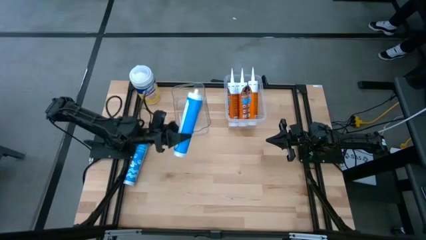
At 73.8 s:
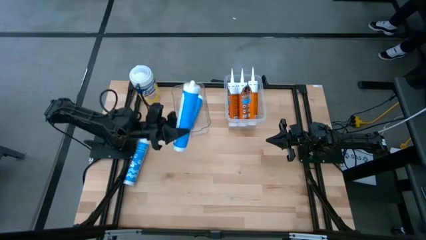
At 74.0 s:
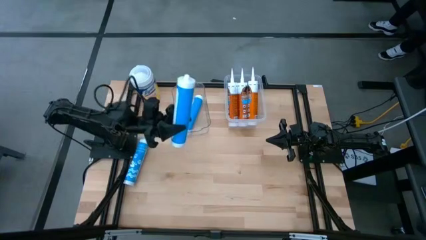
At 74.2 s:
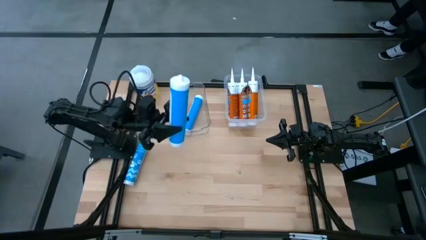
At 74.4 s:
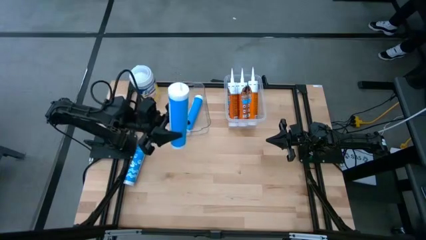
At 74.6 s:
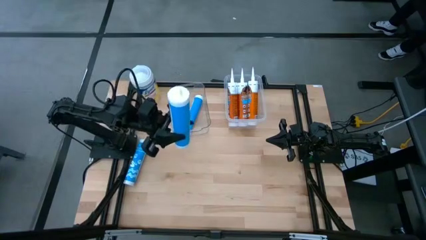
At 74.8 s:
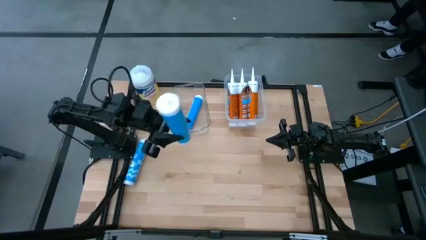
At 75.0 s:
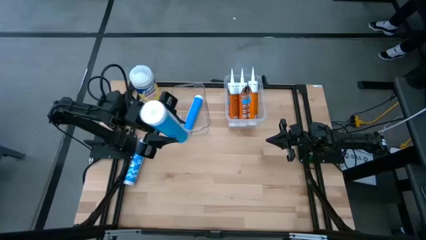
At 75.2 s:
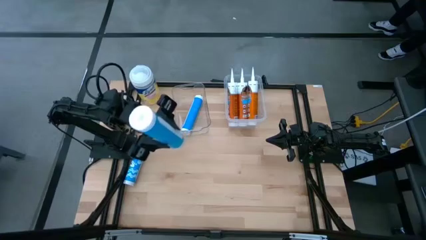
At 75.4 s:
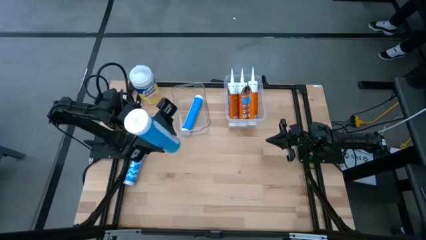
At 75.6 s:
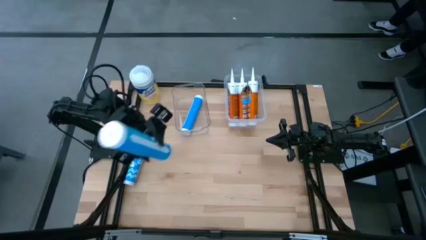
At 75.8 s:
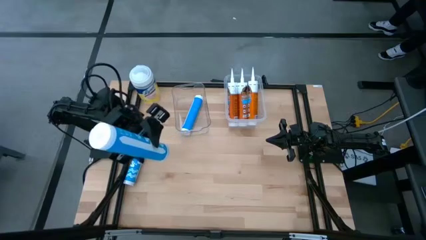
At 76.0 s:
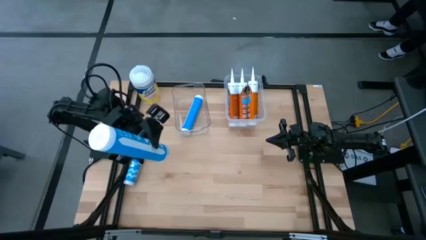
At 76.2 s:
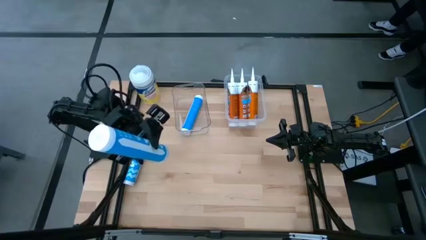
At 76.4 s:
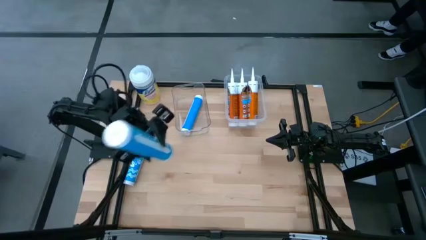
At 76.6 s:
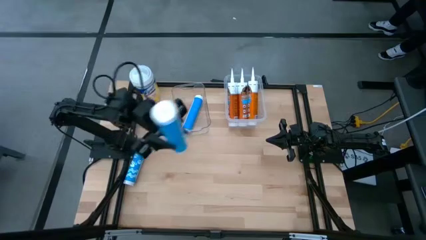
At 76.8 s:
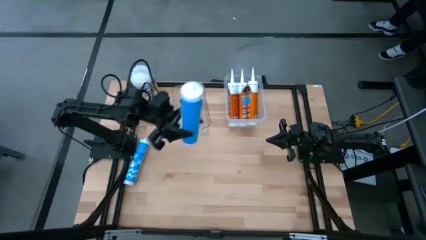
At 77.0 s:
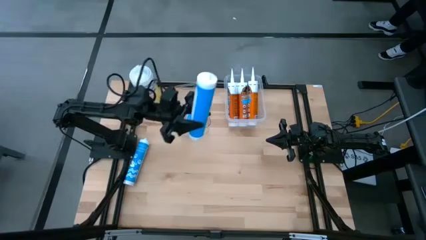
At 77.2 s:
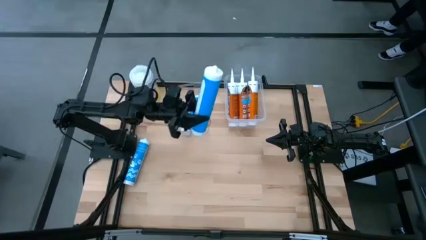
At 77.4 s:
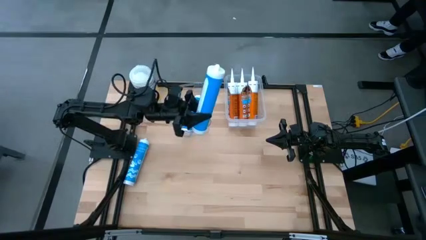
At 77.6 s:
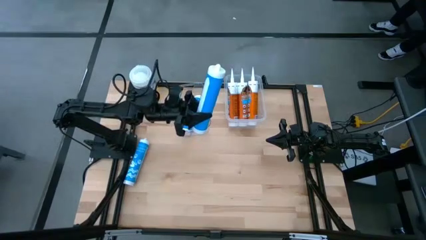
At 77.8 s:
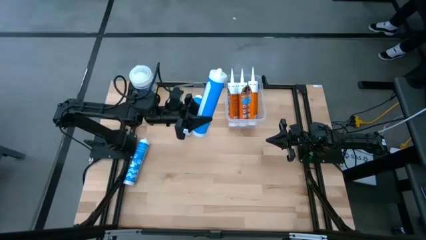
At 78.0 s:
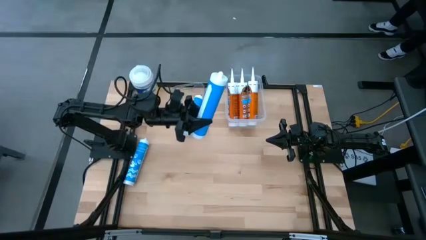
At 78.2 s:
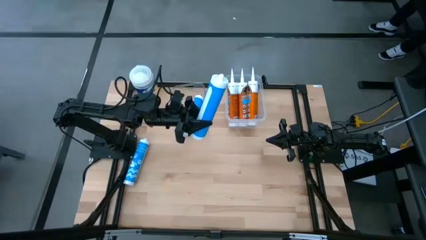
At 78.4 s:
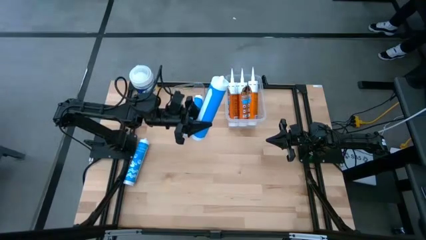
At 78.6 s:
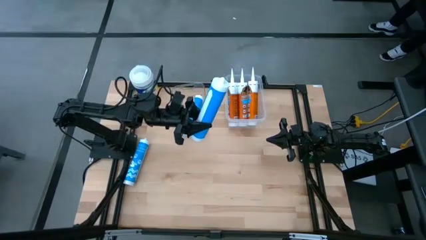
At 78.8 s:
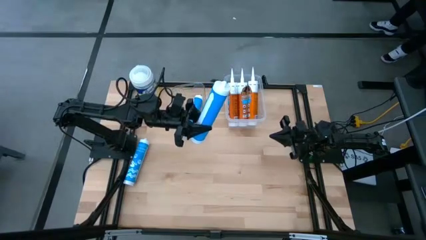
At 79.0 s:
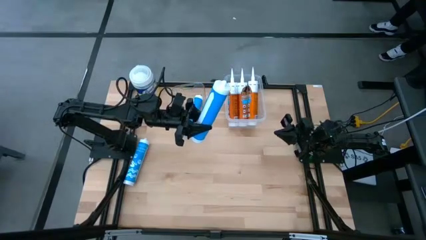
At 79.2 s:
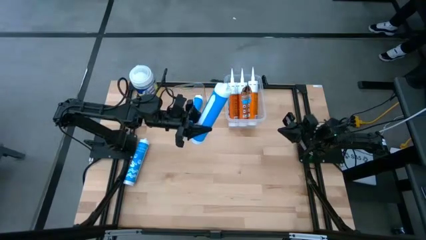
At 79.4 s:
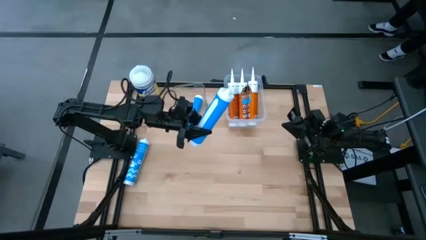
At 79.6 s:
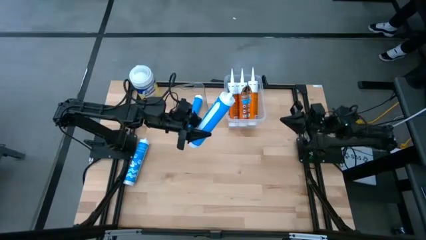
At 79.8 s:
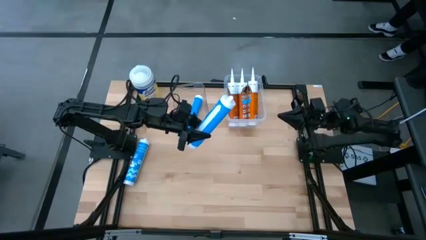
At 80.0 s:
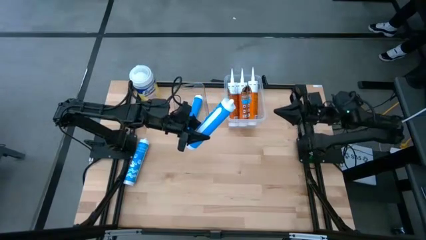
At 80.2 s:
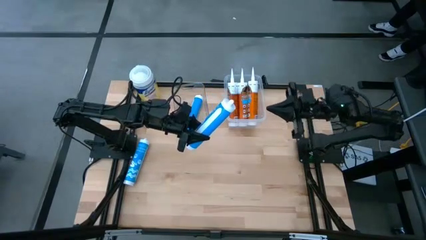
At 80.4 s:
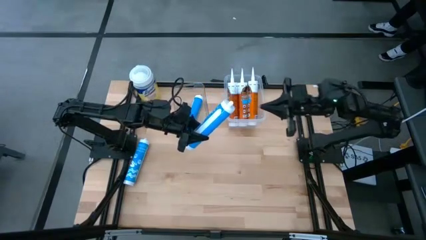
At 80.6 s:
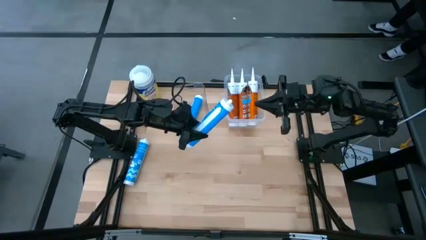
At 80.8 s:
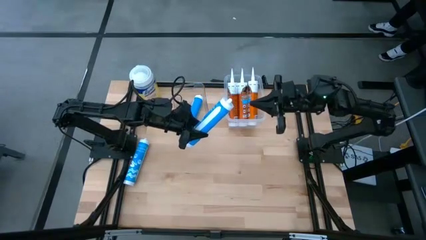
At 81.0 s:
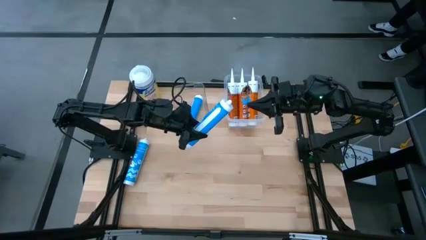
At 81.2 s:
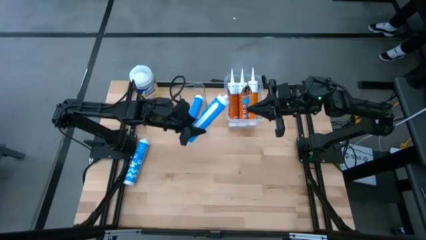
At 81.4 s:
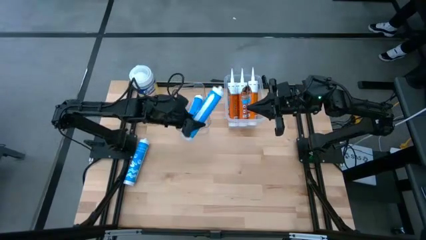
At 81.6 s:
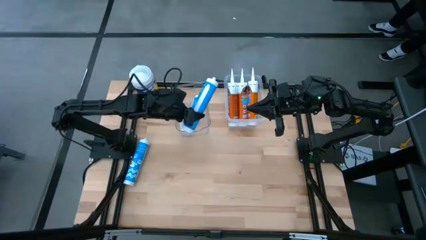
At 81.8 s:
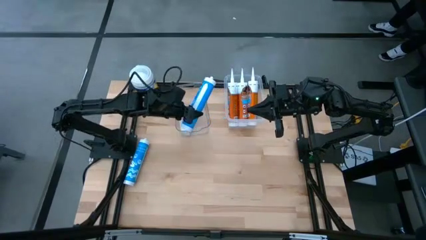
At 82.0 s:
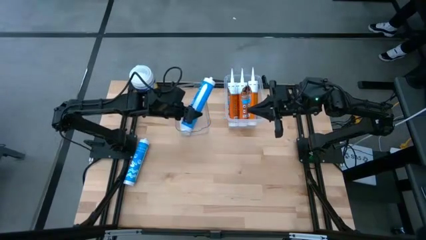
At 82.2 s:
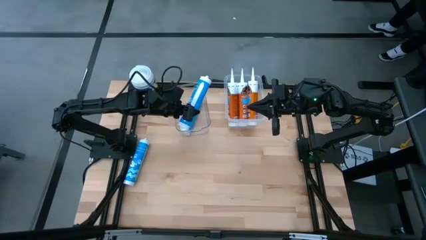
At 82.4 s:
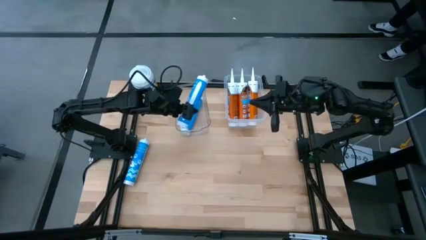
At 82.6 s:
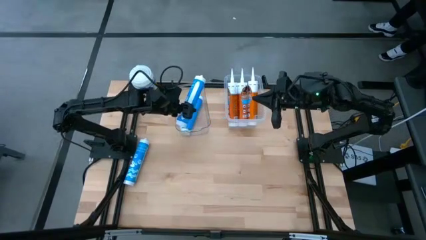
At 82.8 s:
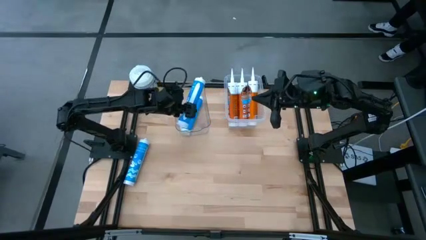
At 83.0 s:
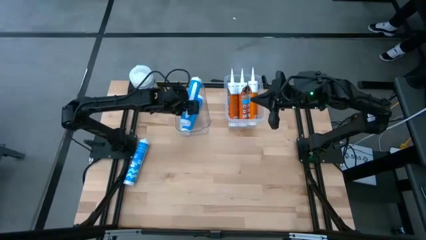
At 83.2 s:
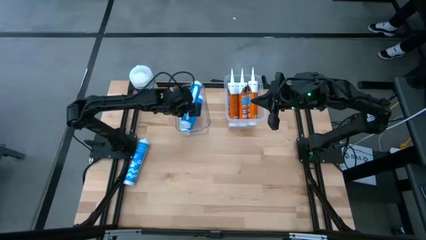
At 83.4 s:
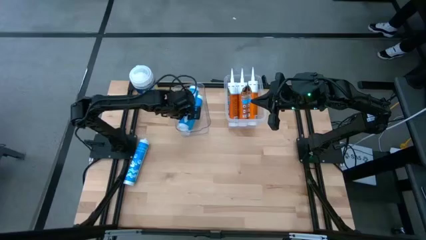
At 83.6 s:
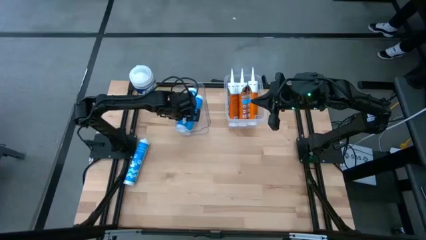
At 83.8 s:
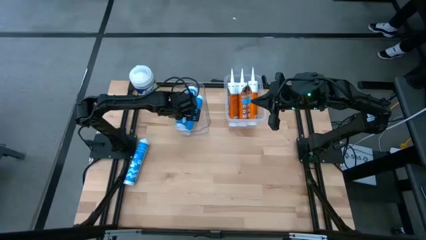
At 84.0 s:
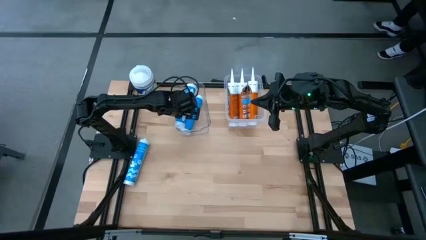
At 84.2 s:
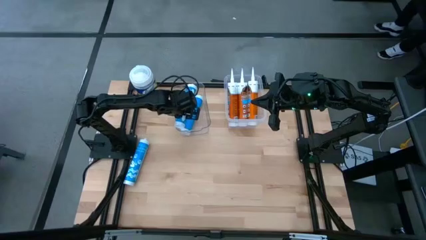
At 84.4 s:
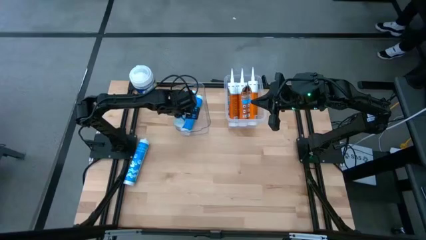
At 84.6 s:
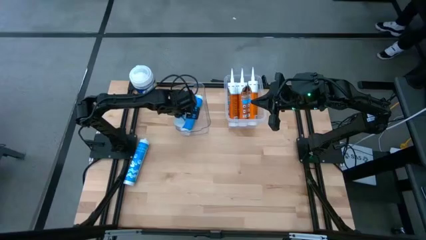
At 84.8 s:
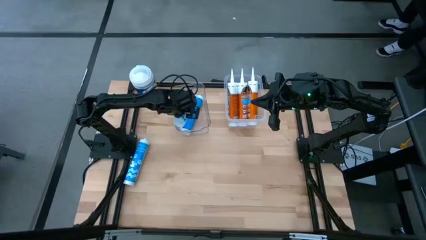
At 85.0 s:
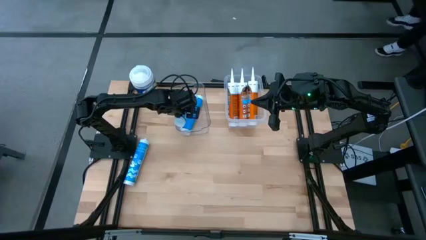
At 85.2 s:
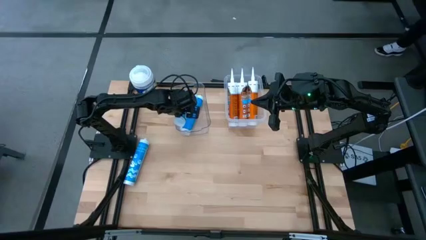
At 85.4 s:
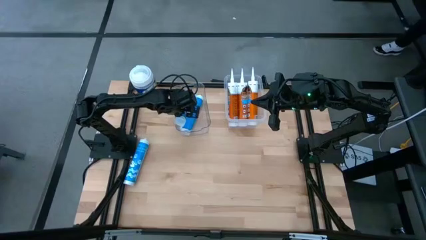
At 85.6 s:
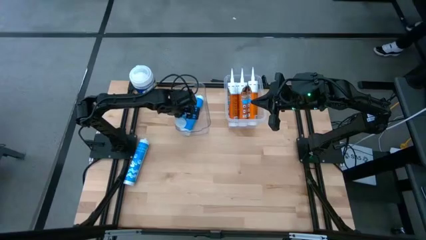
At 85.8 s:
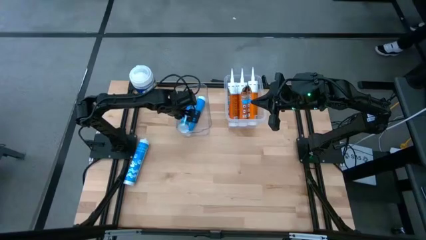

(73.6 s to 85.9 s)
Task: Pick & place silicon tubes, Sealant and Lysol wipes
Put the right blue sealant into the left transparent bin
